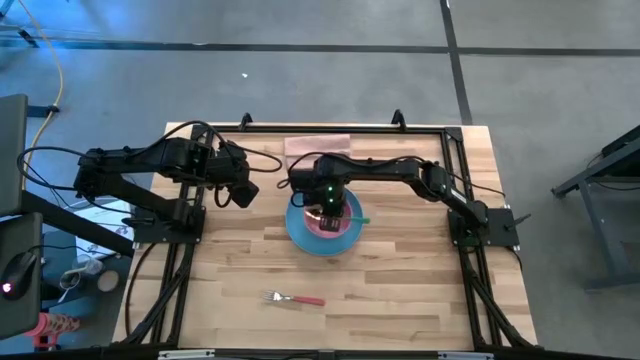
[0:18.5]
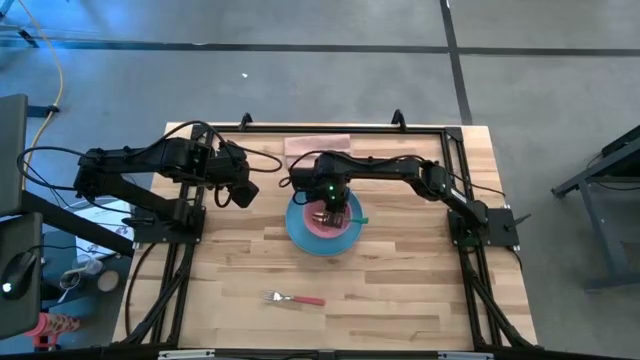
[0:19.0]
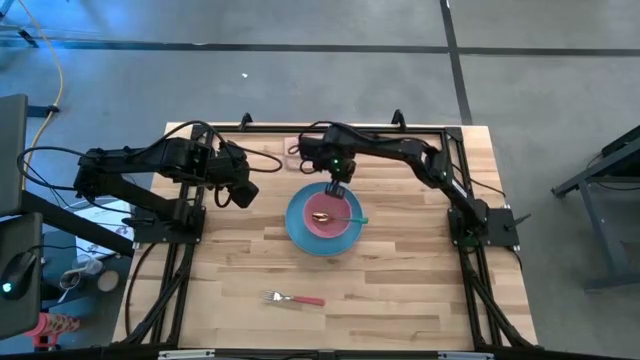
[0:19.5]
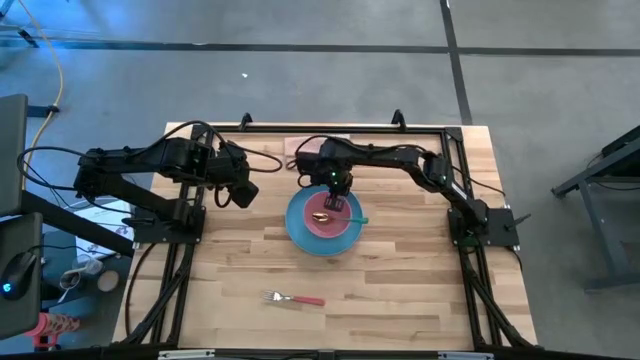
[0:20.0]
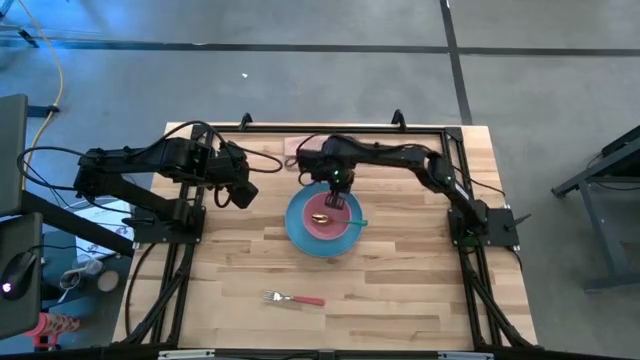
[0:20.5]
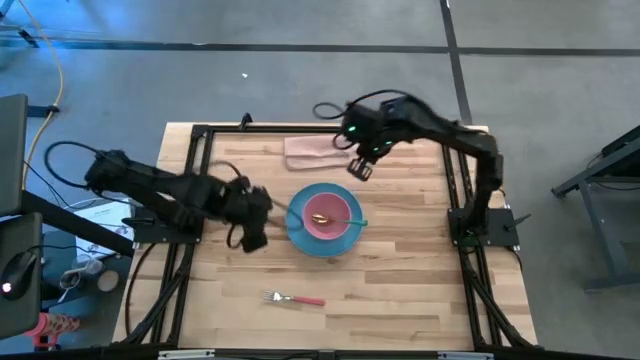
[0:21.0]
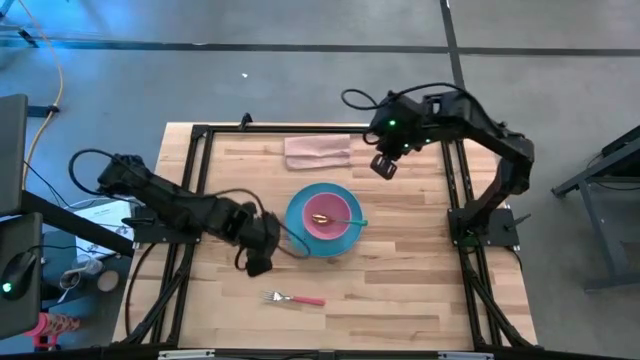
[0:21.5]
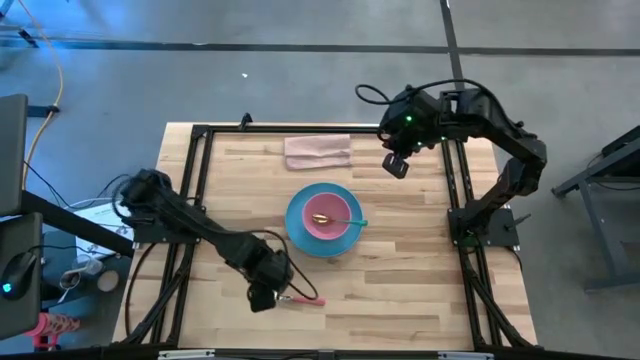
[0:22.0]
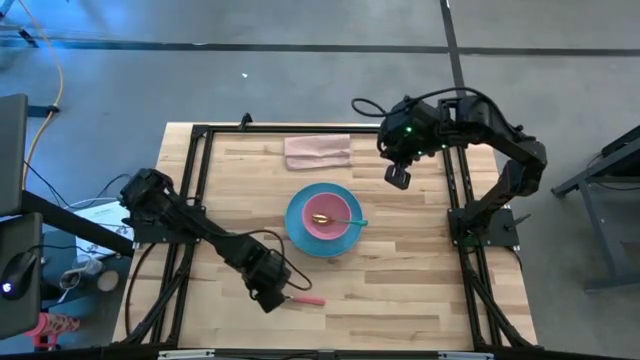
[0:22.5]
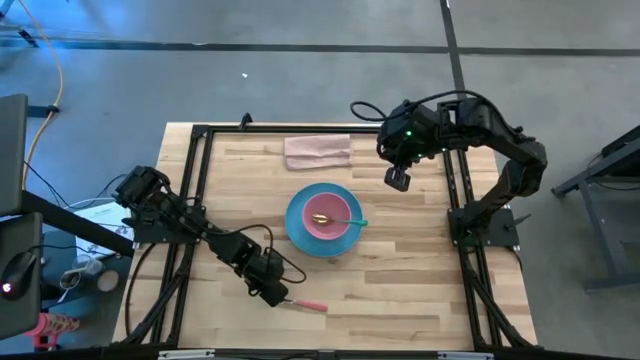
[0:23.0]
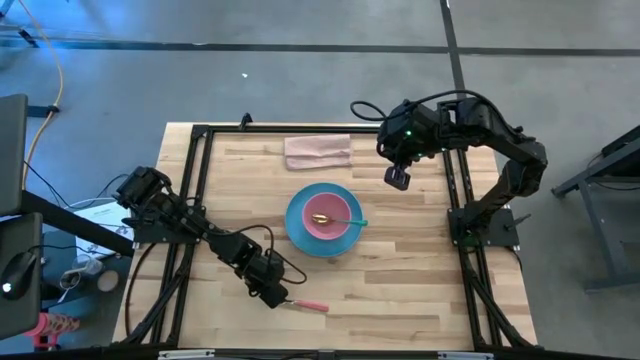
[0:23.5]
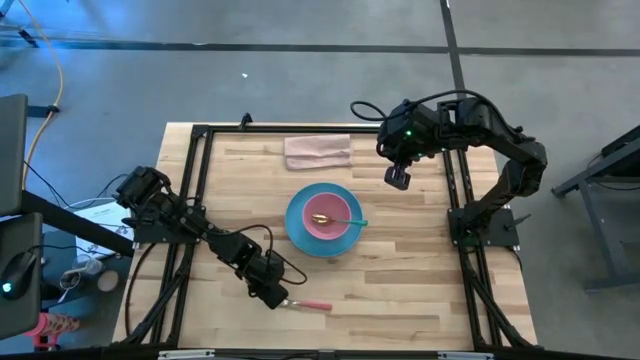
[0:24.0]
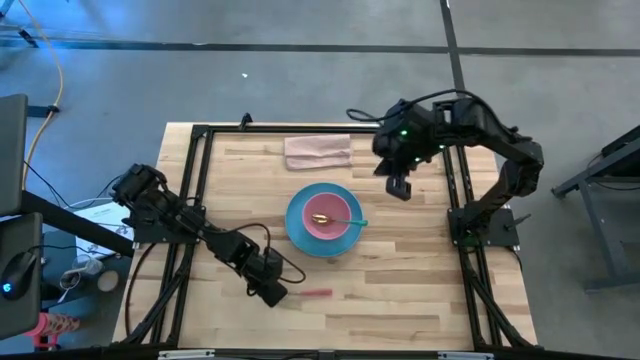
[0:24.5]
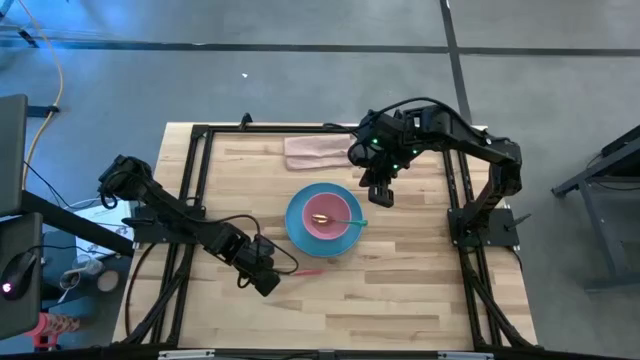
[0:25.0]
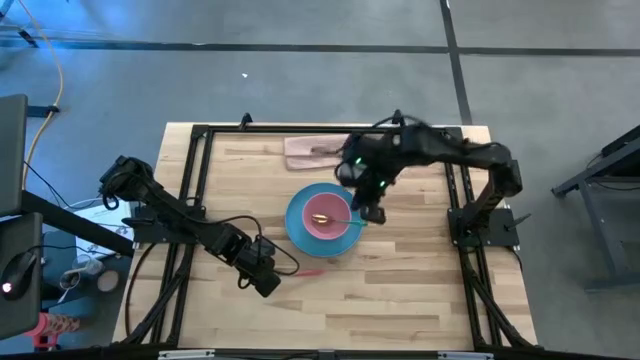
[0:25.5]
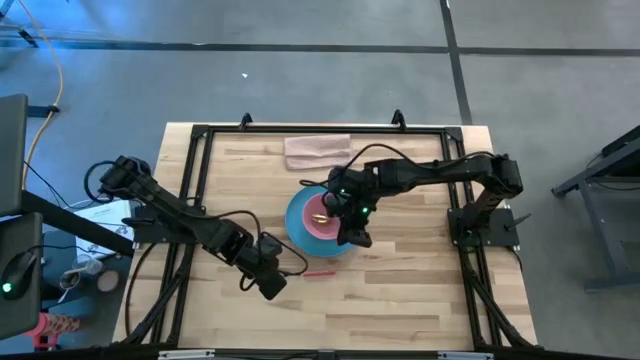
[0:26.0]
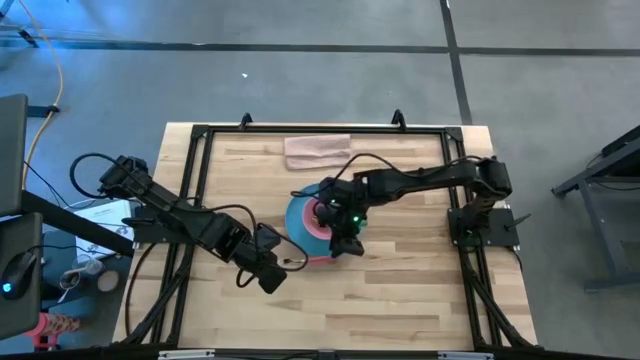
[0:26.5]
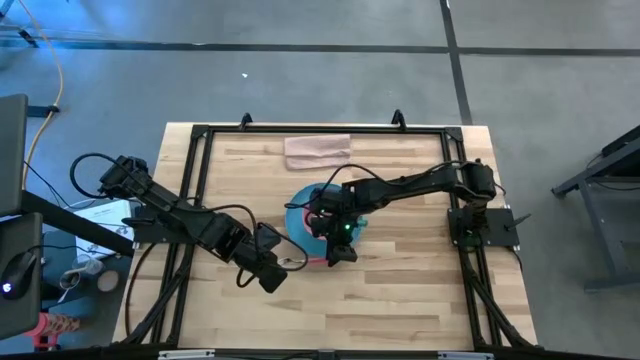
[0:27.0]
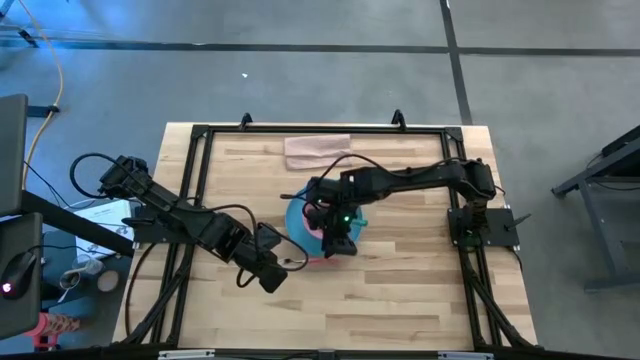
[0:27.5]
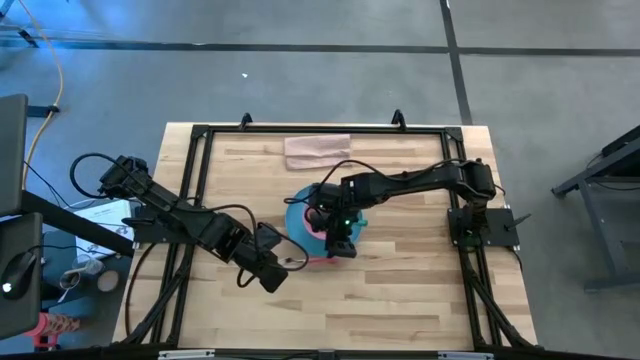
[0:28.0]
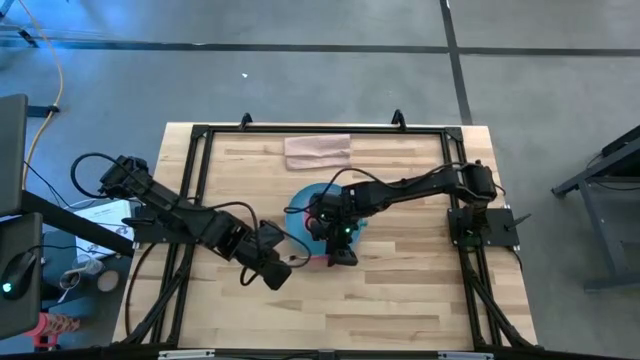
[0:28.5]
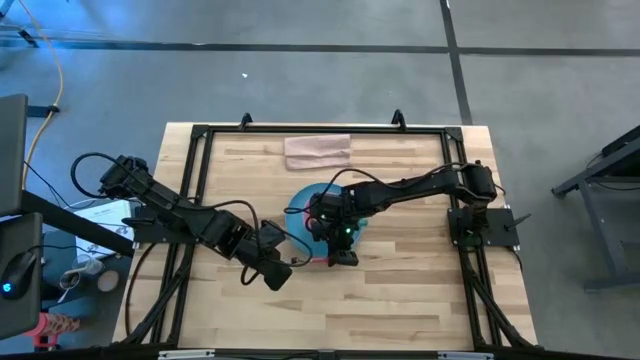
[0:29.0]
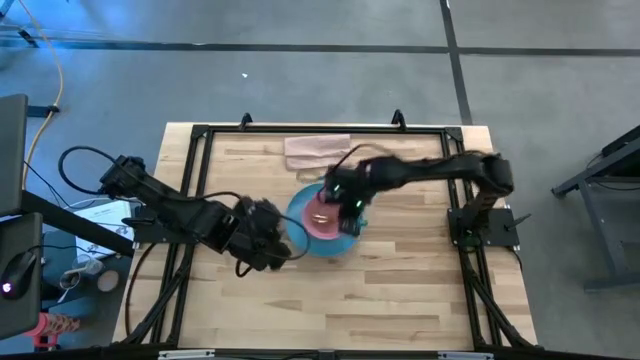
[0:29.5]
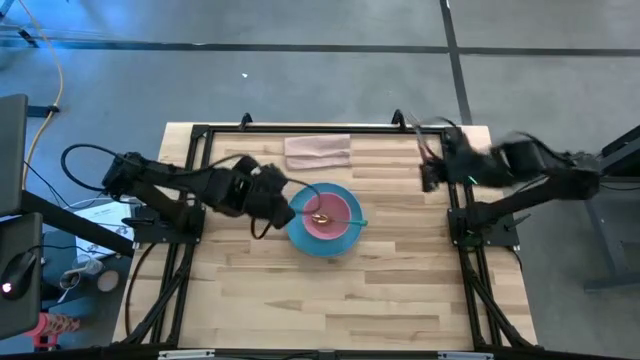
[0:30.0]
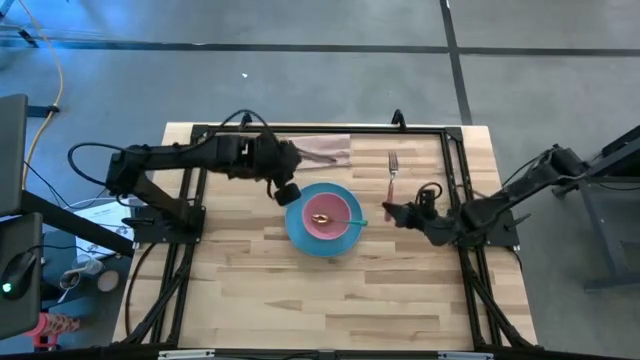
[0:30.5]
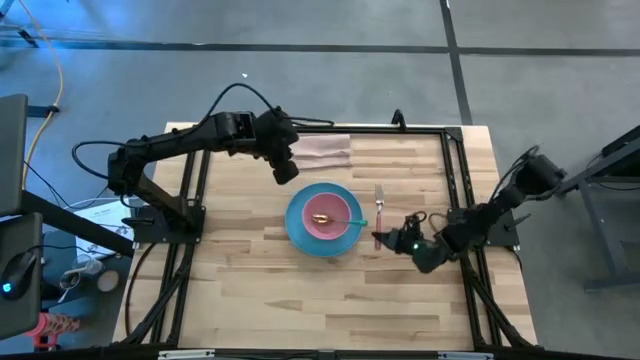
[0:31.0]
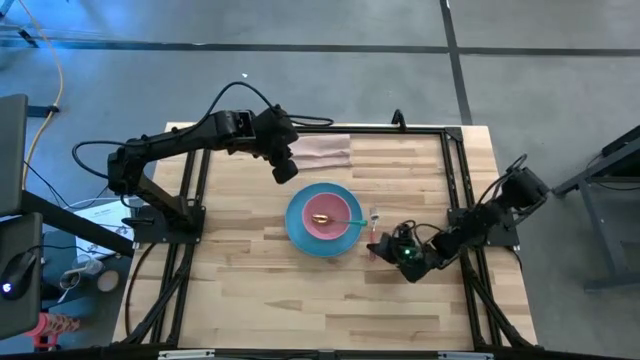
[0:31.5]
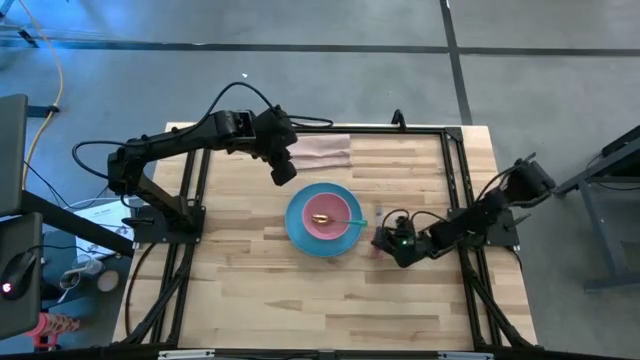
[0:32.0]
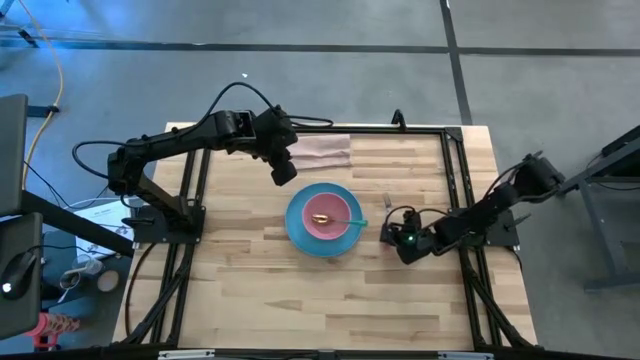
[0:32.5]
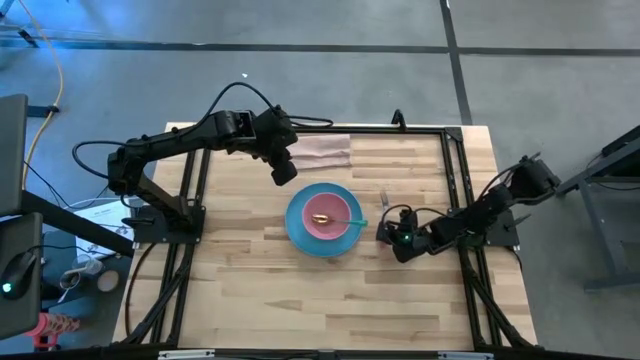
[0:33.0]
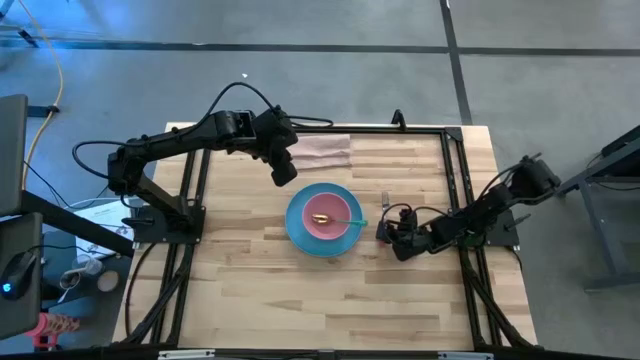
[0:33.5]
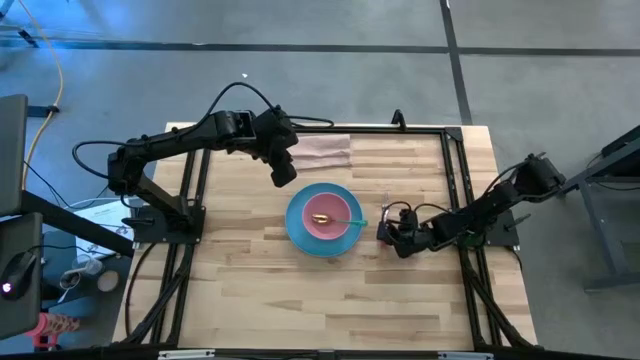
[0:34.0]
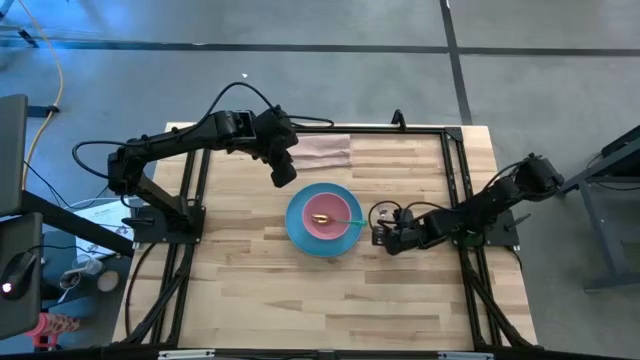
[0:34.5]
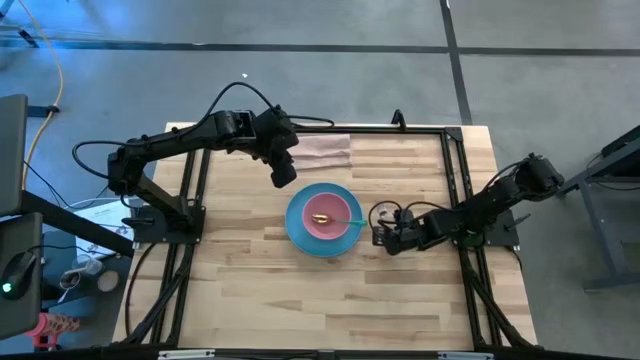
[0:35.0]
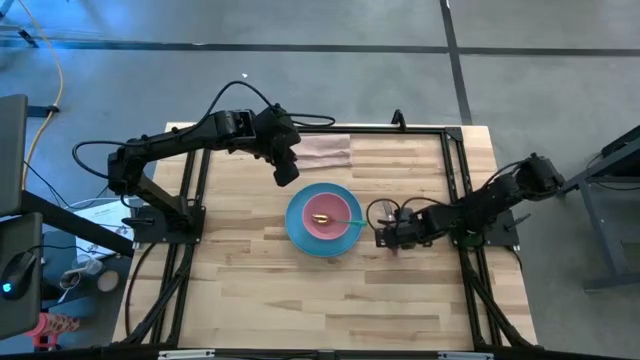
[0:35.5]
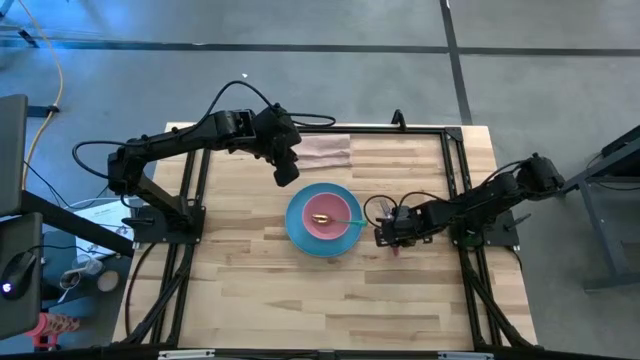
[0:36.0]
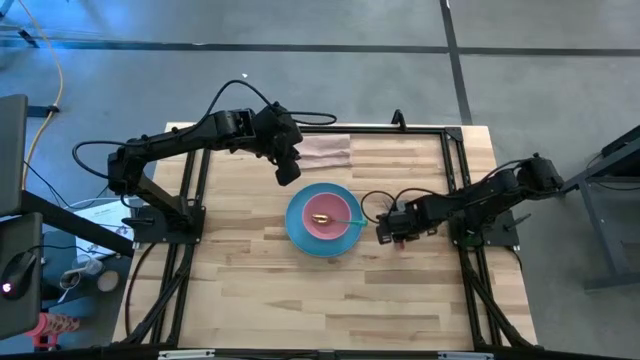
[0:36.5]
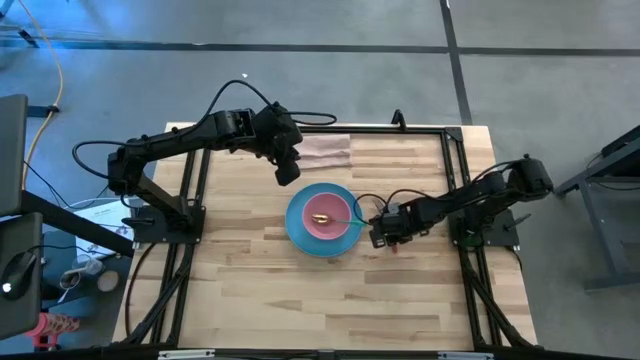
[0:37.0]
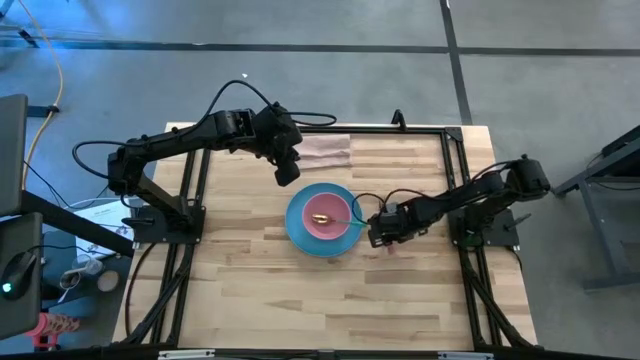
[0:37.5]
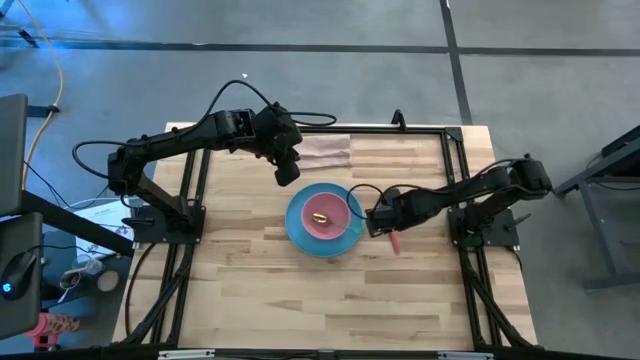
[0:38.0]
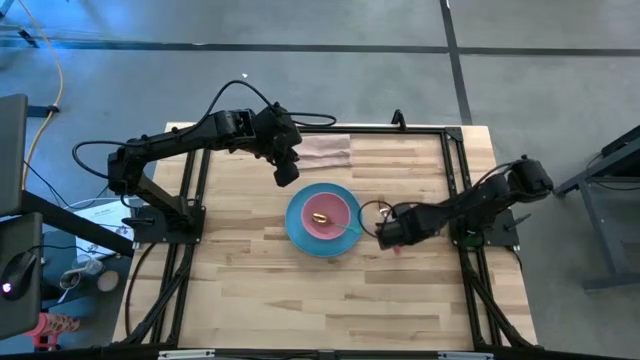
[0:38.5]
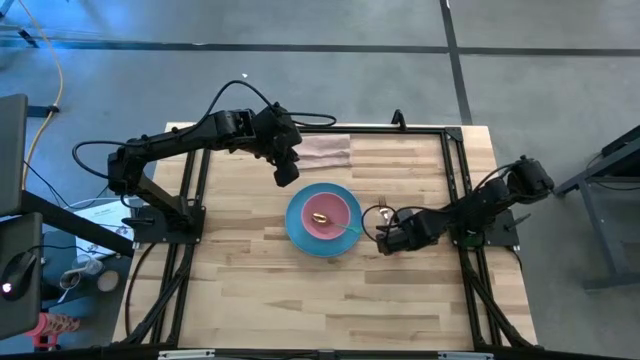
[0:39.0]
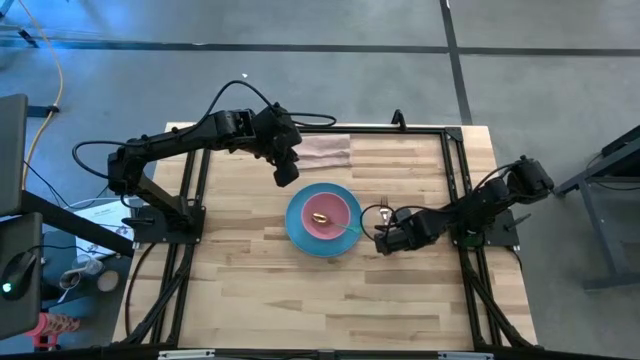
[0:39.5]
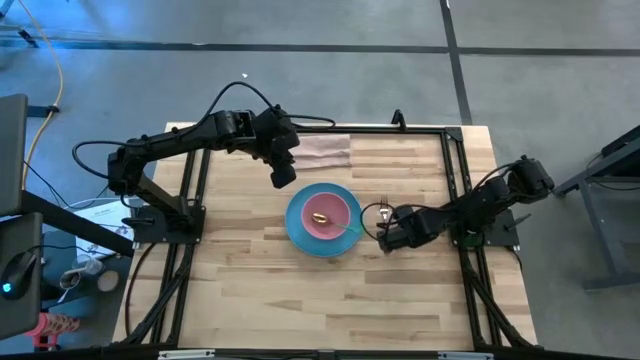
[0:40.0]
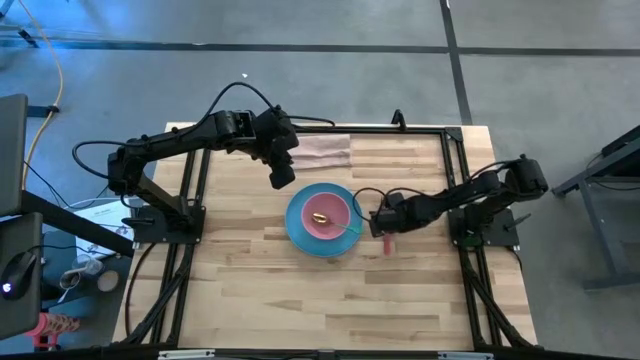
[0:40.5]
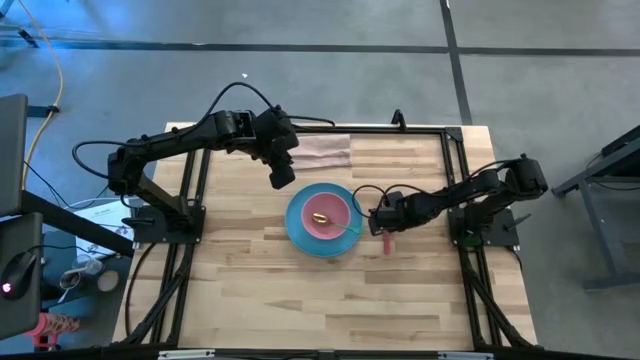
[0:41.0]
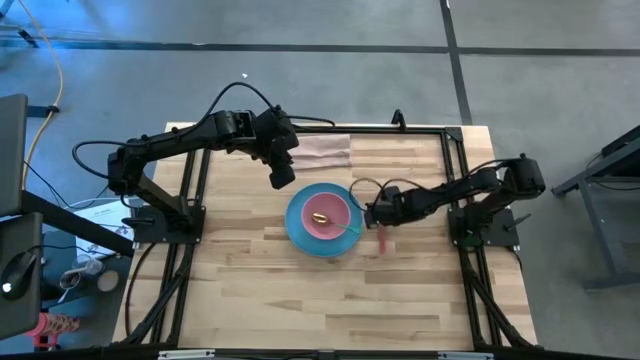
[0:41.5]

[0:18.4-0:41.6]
Task: Set table place
Put the fork on the right of the plate
